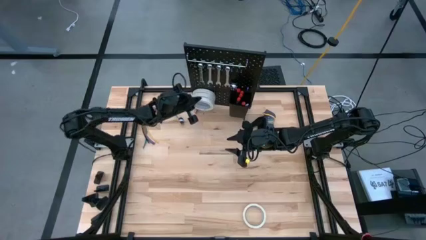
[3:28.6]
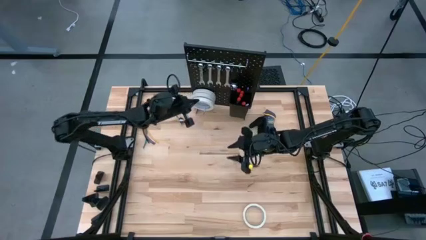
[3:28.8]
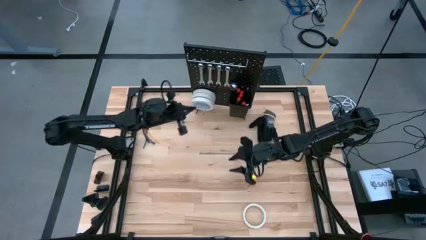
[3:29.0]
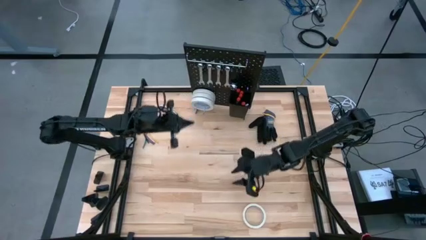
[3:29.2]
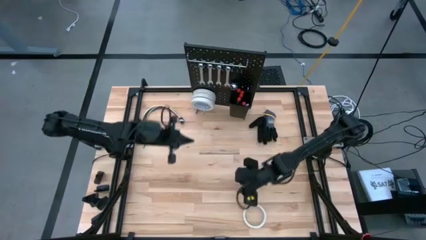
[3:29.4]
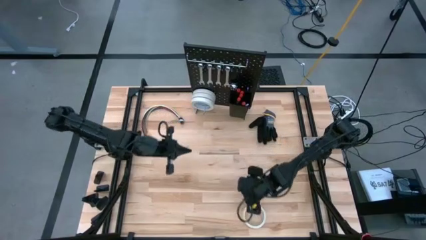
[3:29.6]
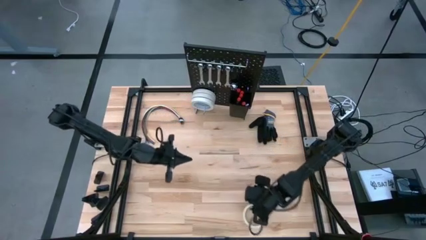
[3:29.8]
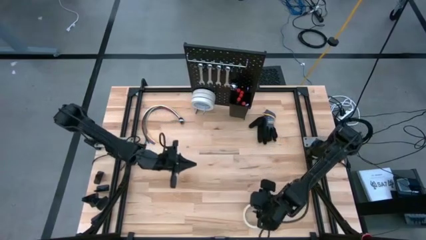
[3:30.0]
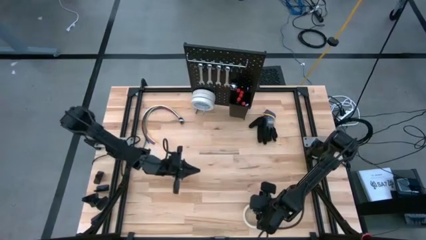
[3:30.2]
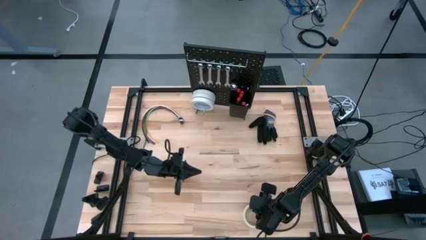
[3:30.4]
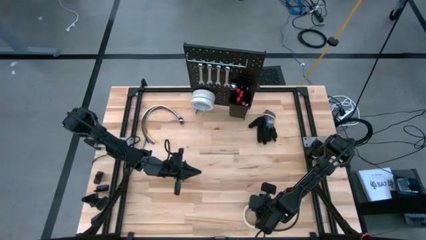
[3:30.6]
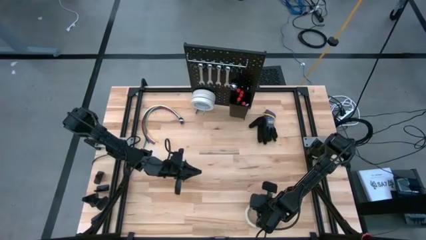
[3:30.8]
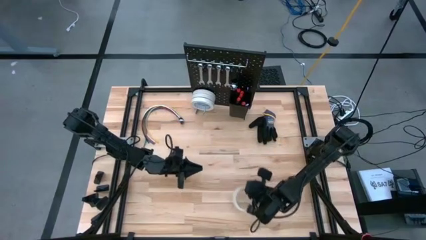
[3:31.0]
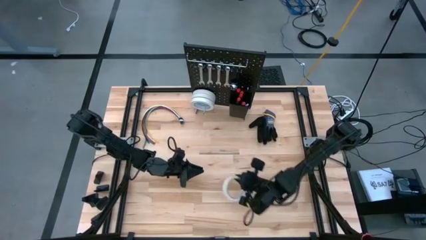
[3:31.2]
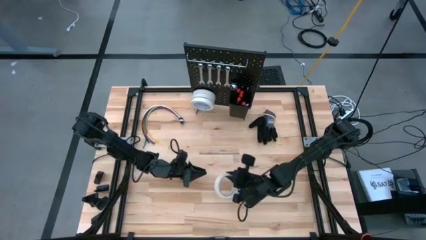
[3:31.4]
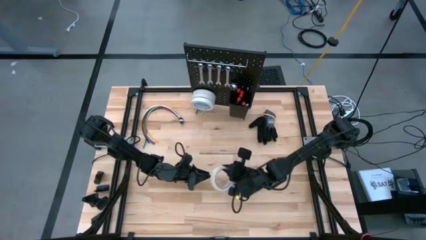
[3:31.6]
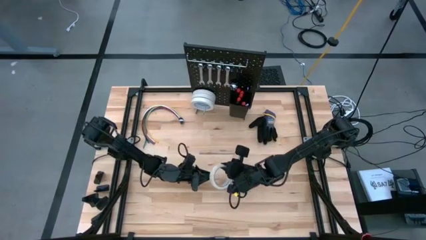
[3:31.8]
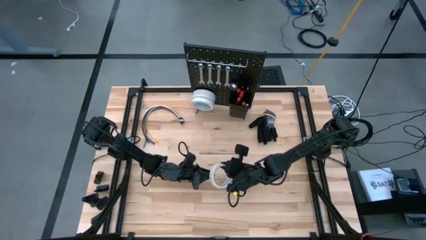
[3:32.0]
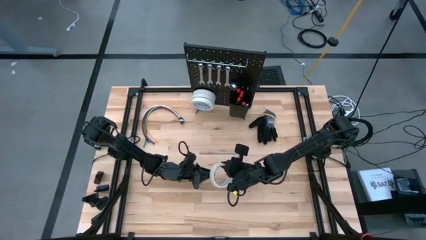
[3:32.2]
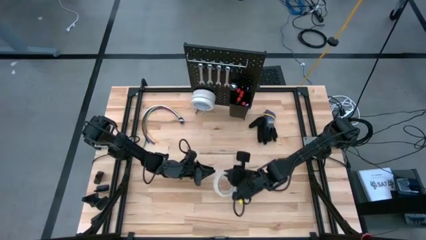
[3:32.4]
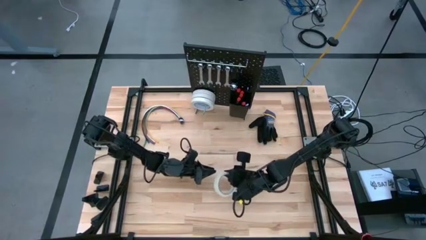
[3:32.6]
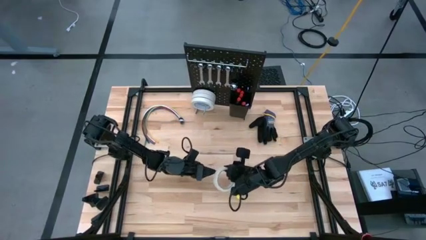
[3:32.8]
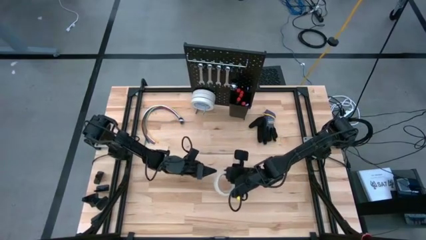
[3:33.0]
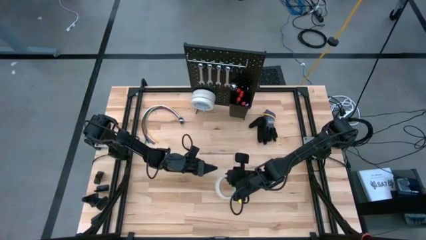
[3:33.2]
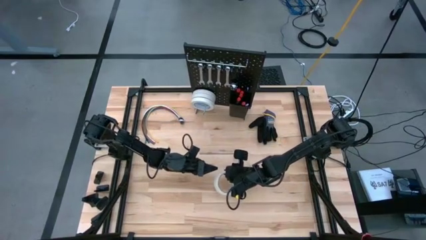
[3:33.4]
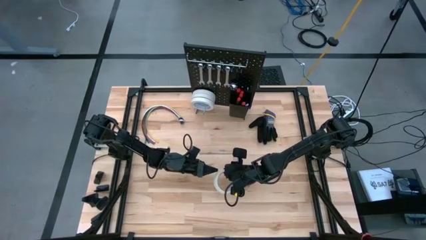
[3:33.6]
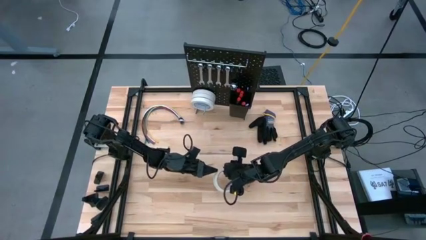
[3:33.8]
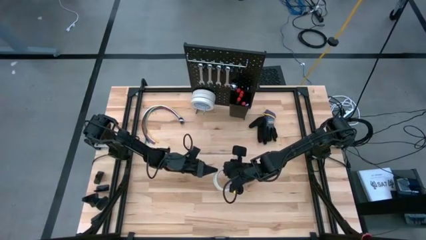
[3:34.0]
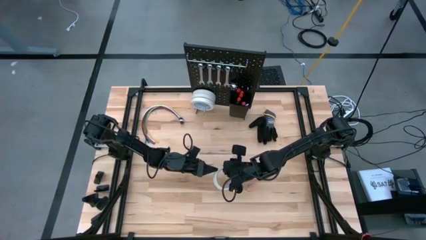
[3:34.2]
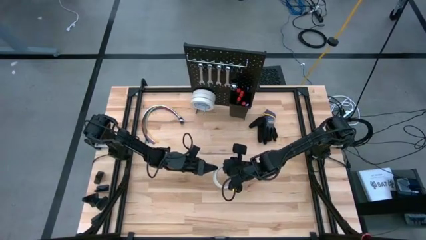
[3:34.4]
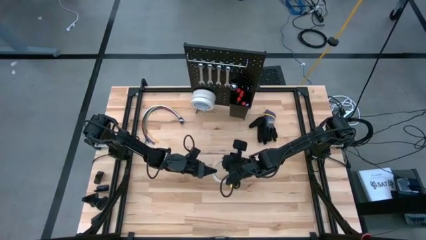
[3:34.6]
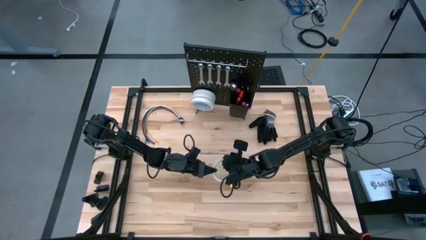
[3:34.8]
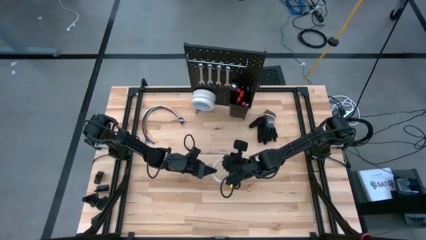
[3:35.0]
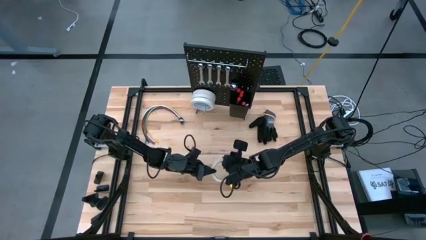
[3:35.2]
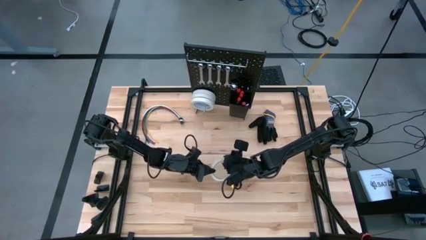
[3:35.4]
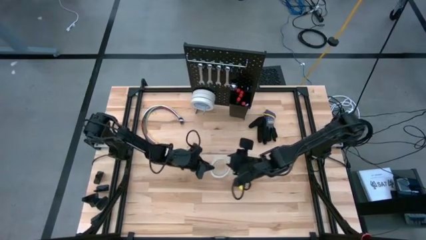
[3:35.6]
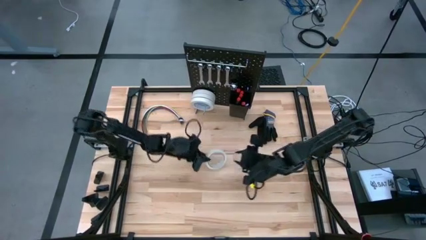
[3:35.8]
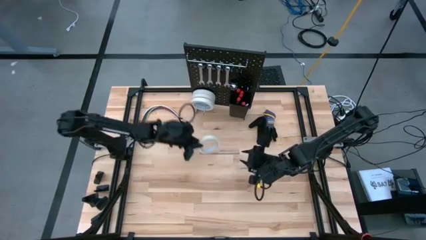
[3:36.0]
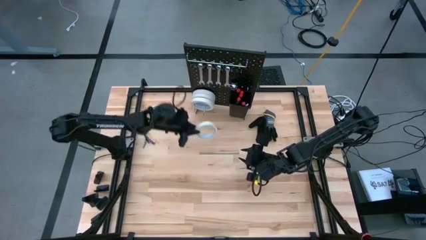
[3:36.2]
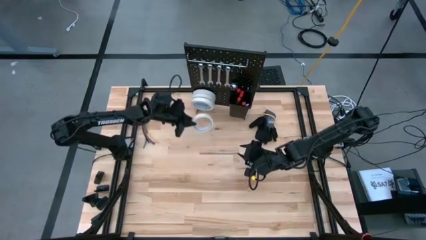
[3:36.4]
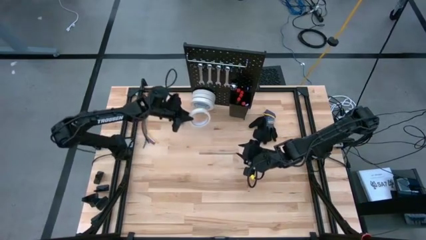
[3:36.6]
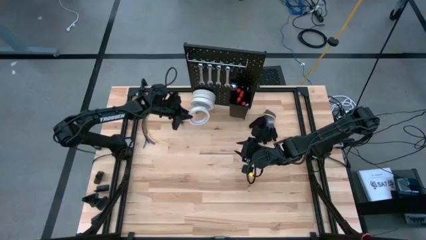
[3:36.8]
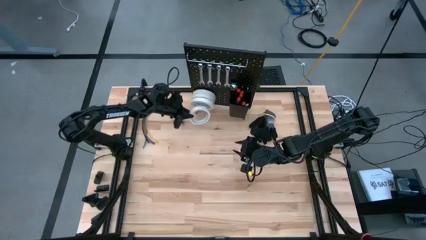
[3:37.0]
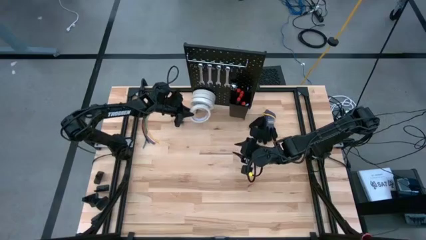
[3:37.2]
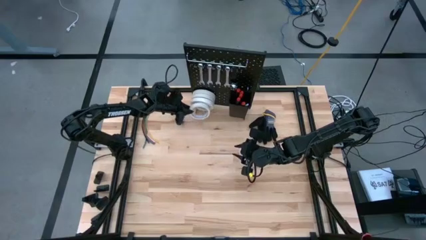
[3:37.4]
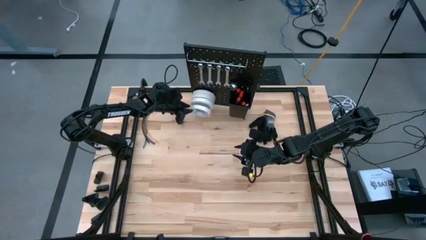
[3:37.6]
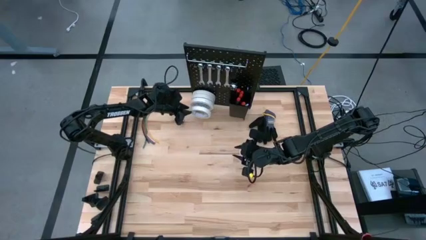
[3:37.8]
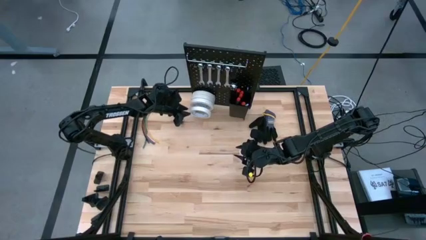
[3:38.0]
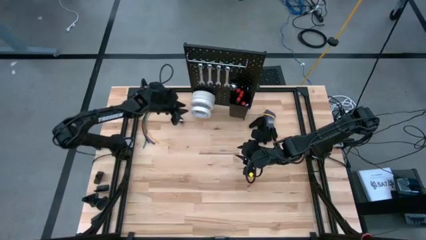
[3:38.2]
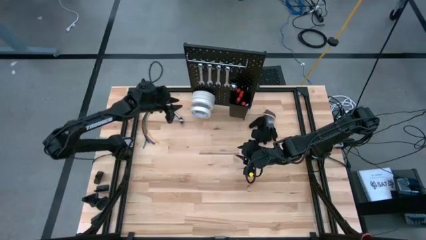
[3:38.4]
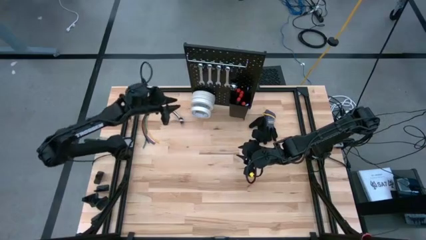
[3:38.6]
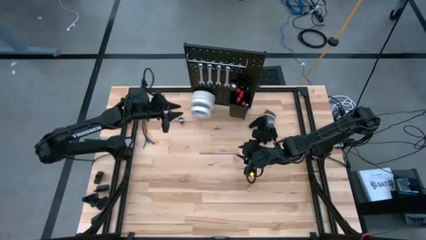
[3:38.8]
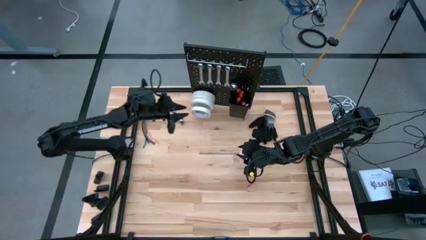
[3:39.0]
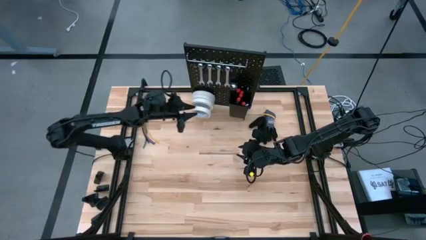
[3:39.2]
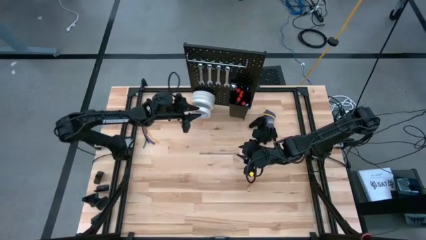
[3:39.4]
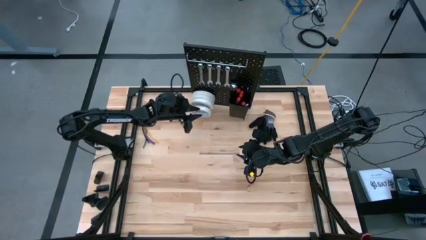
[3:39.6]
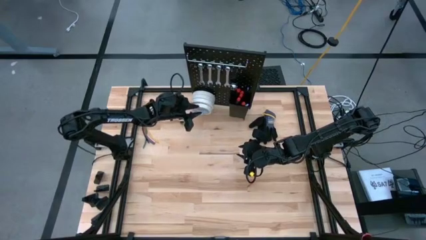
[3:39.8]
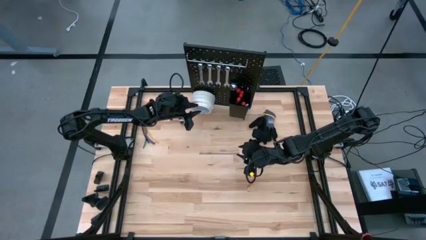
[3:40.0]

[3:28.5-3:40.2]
Task: Hang tools onto peg board
Hang the white tape on the peg board

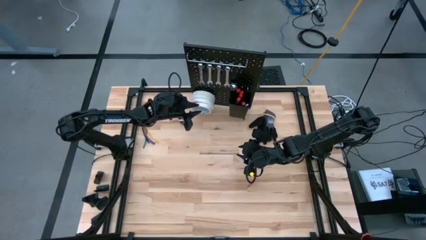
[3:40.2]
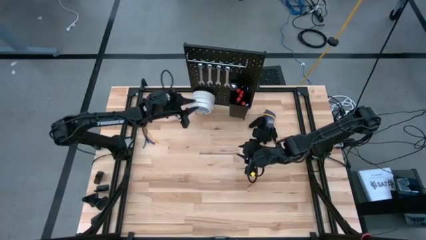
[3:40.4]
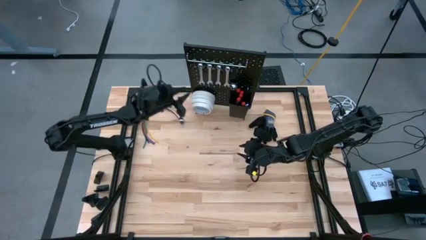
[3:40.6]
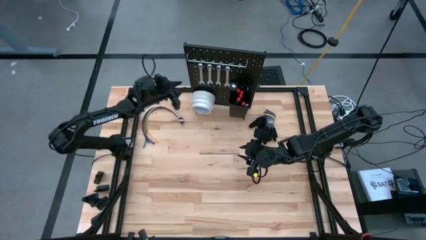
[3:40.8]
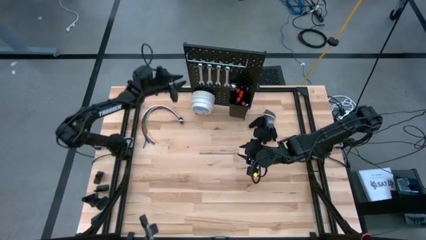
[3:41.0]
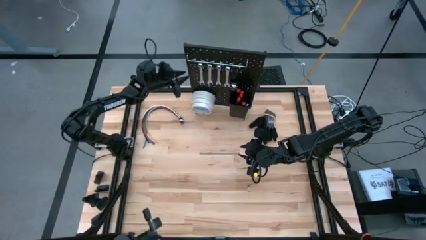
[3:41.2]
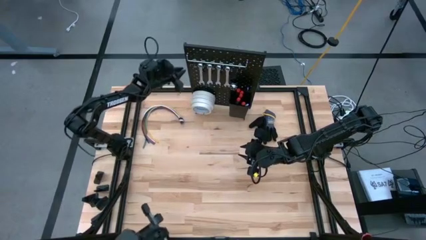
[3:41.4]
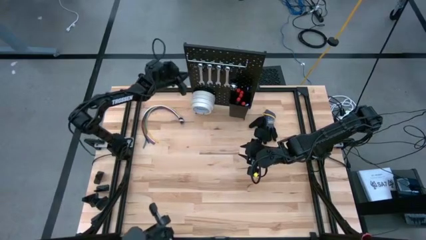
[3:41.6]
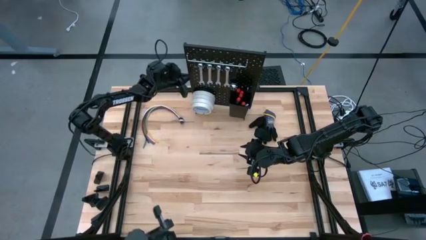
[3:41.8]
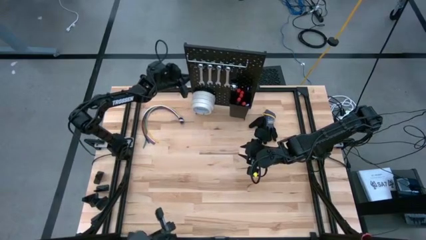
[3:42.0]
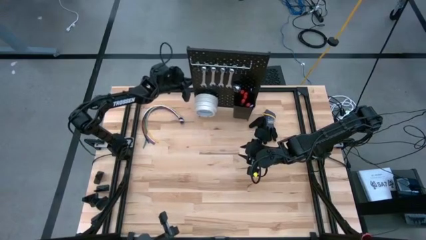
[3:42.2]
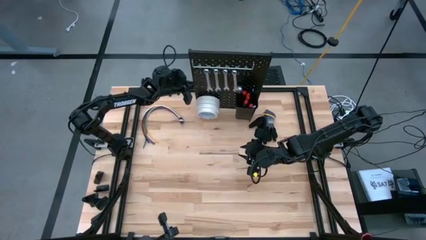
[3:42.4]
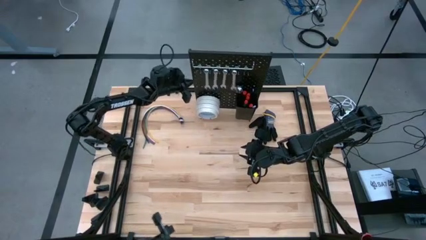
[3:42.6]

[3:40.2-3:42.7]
Adjust the peg board on the table

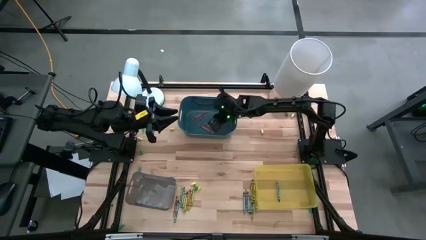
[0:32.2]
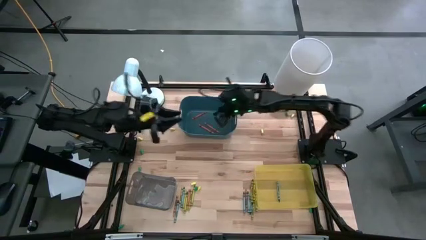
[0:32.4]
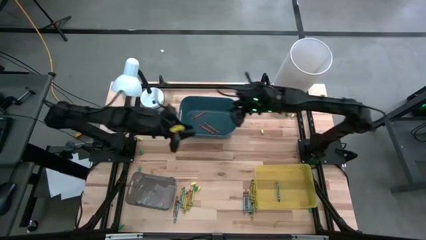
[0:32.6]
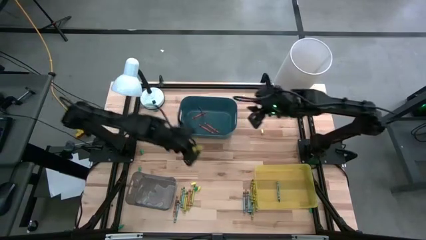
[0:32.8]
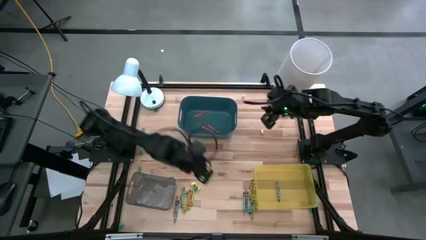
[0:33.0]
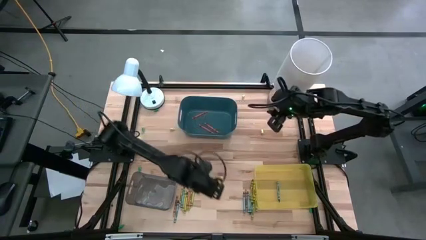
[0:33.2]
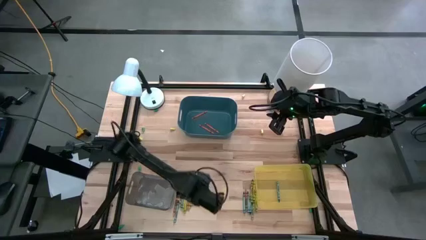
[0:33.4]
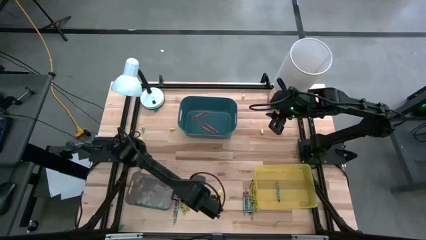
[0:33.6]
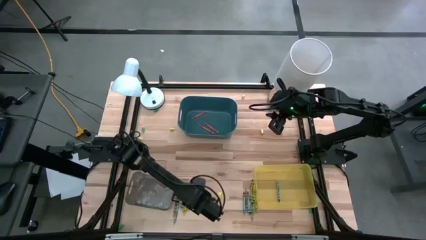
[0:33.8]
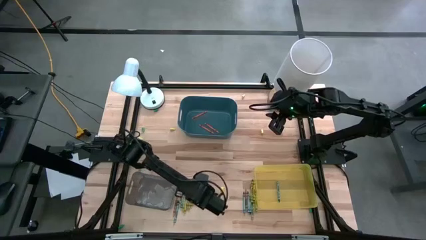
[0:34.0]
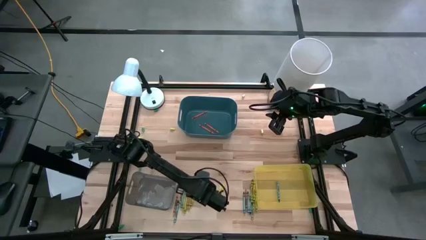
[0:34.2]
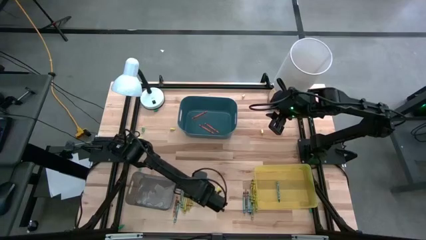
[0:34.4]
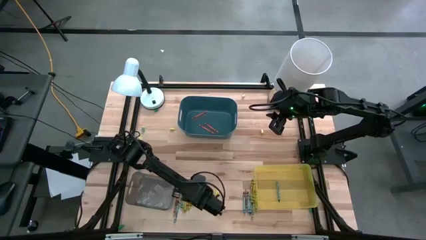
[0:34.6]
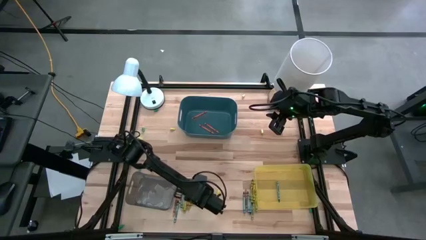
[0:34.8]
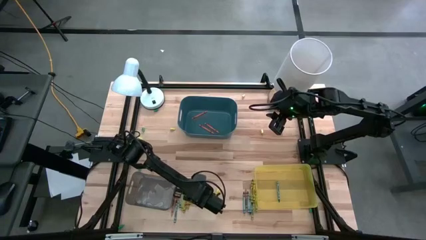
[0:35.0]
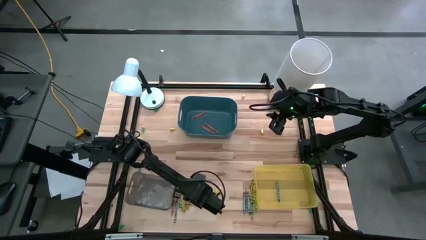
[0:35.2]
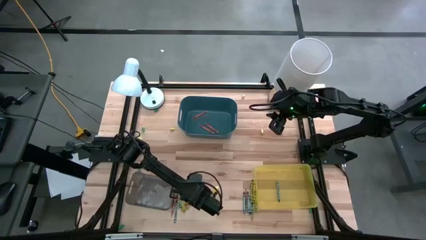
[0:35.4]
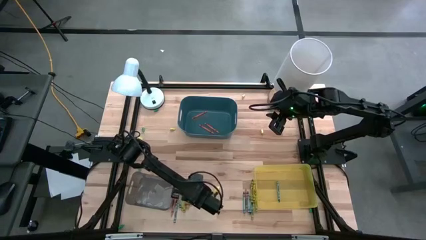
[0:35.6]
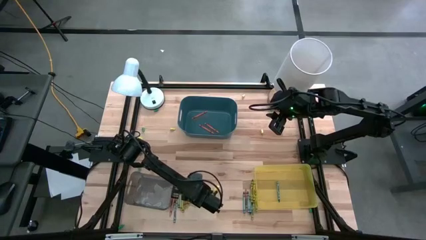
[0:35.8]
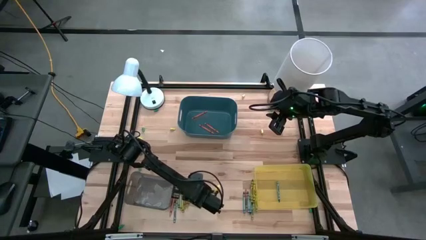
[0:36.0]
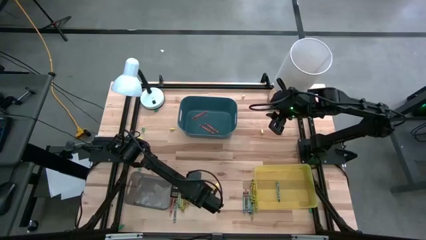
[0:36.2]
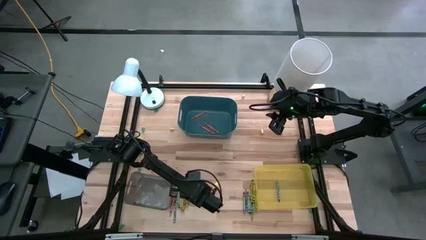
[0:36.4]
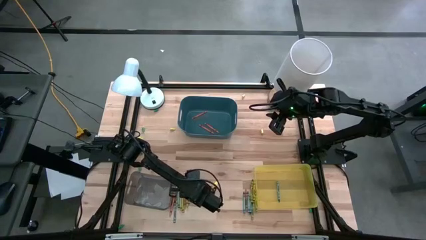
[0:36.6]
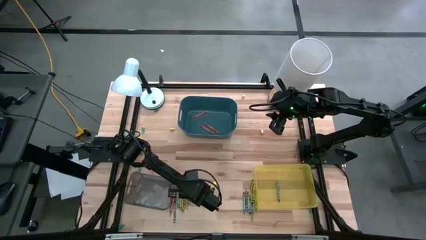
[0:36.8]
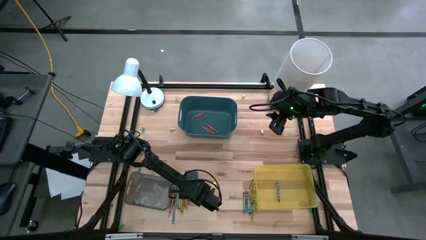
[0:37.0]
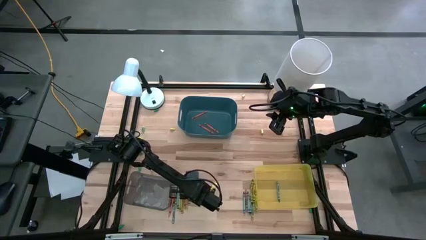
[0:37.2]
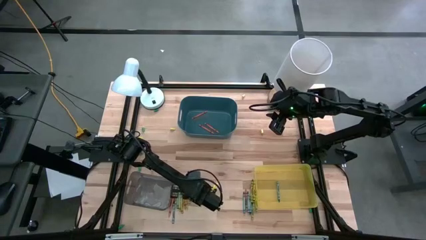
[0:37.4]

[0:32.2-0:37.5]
Task: Sort crayons
Put the yellow crayon into the gray bin
